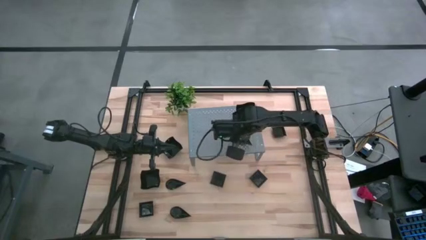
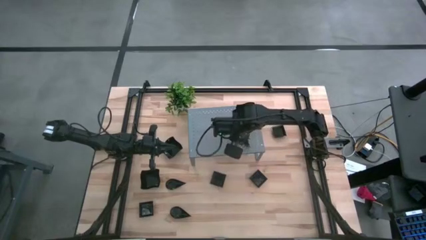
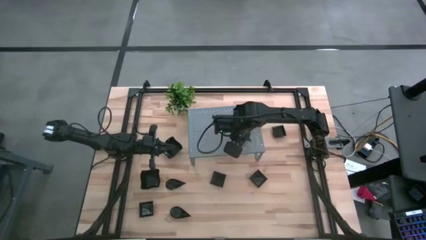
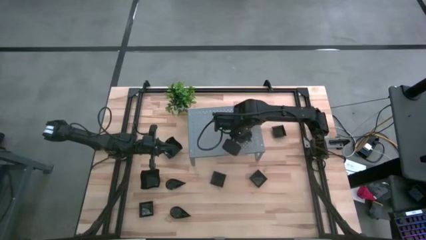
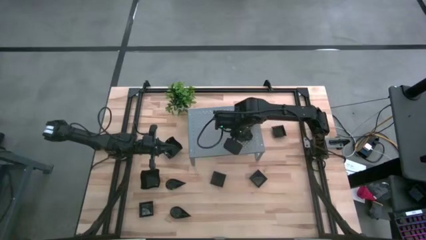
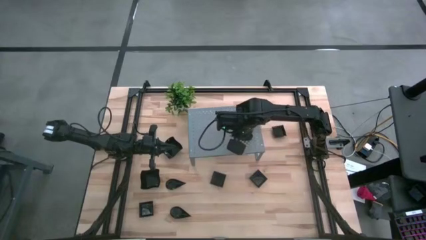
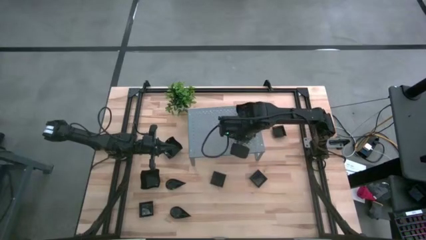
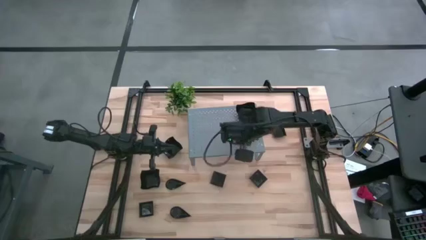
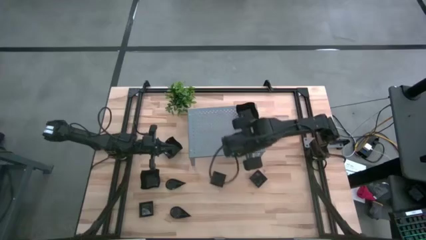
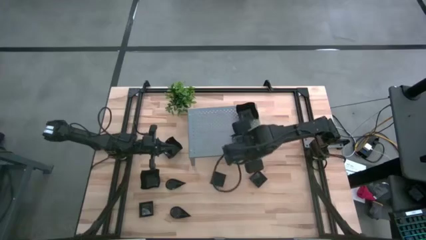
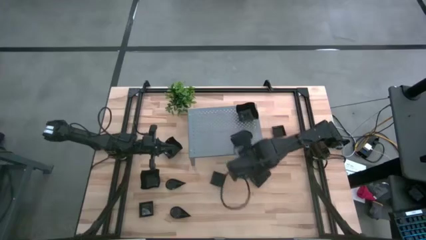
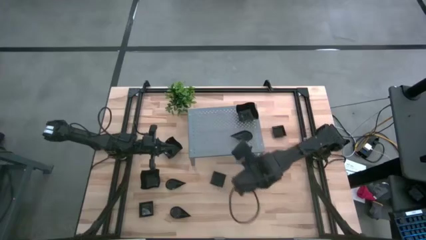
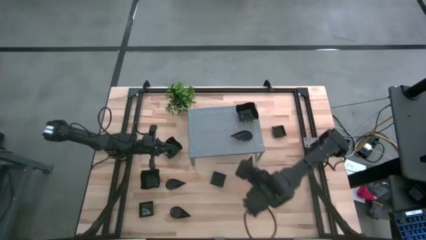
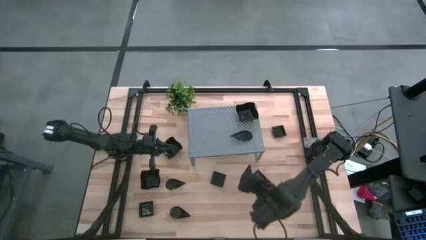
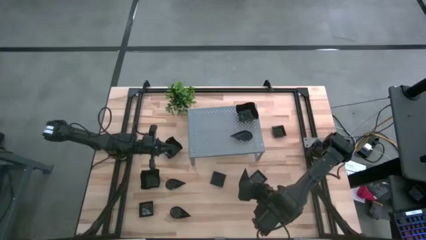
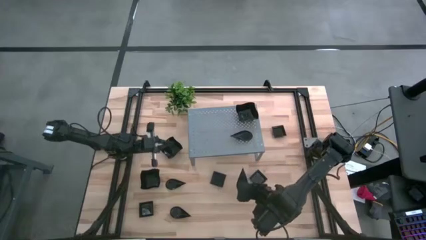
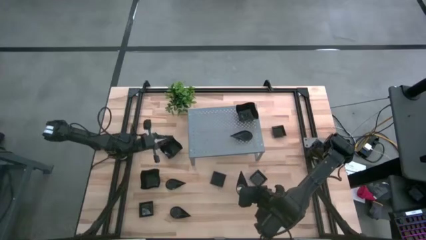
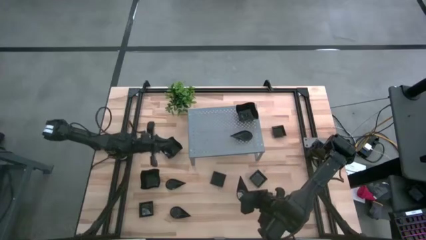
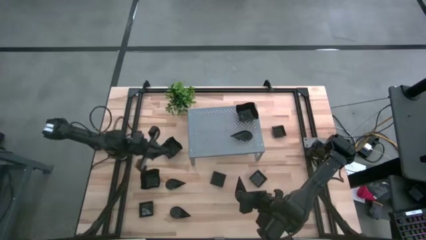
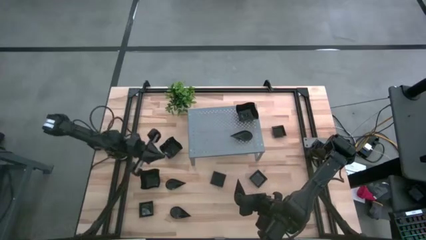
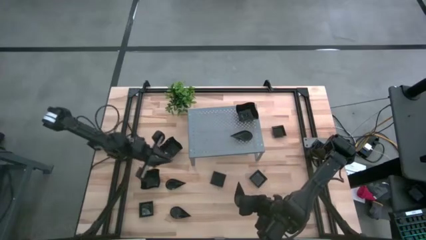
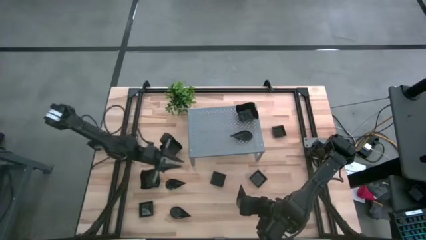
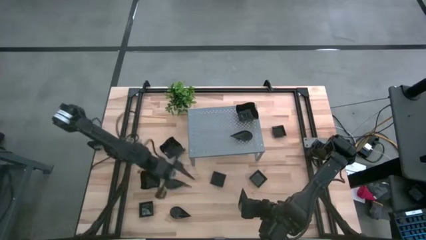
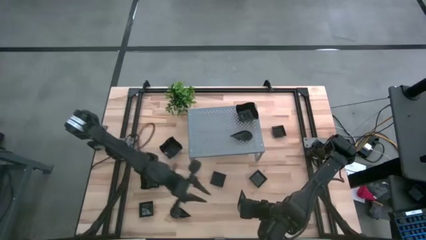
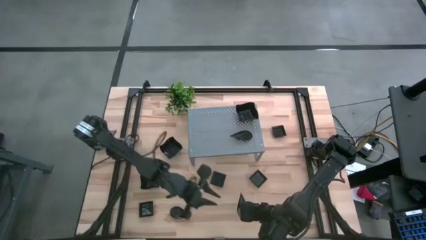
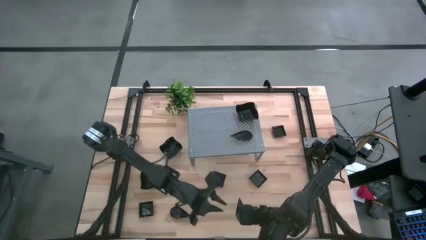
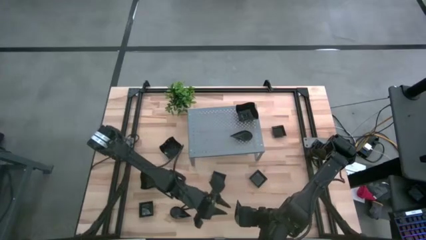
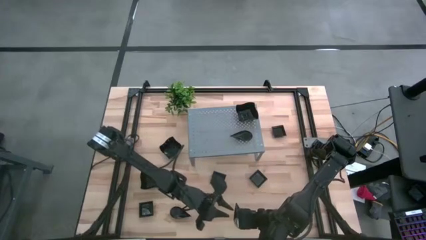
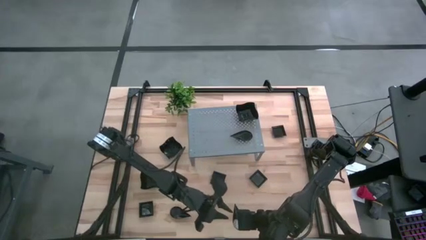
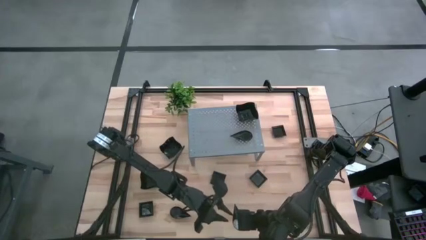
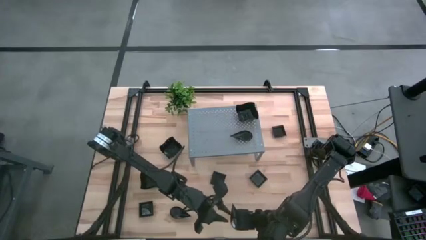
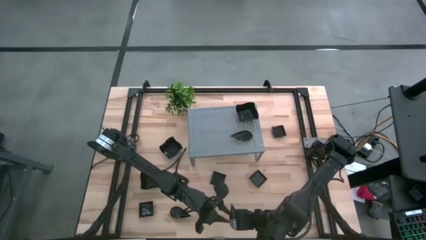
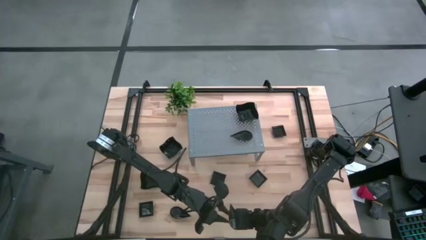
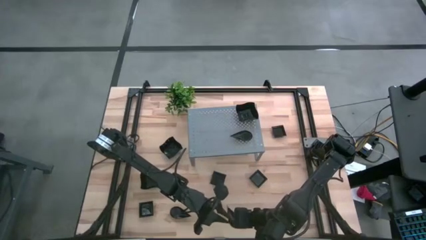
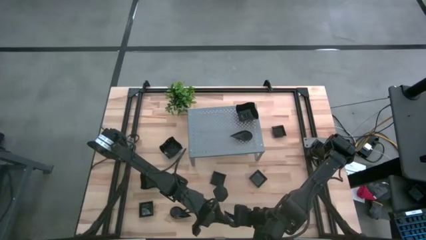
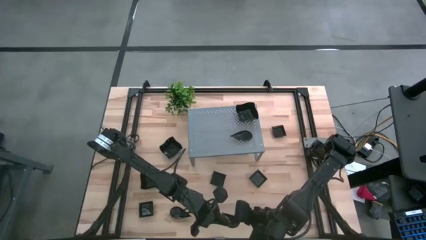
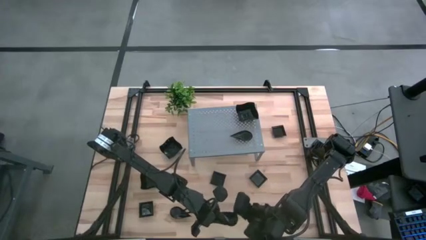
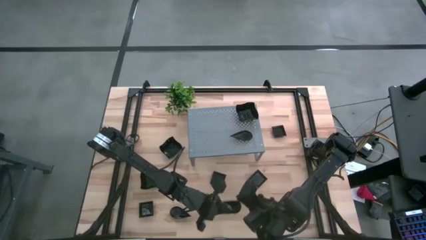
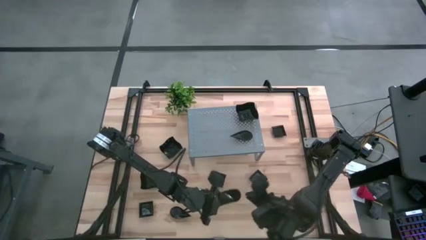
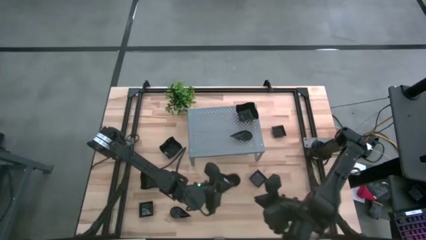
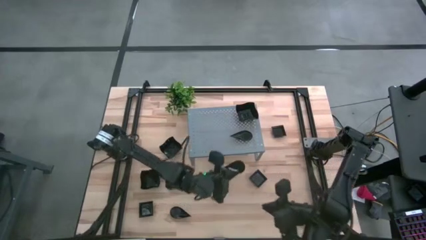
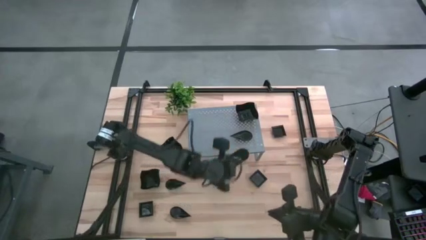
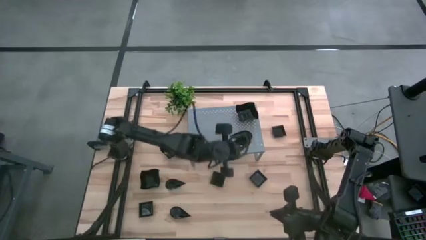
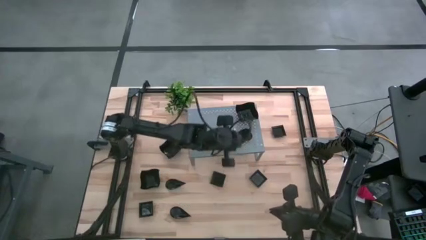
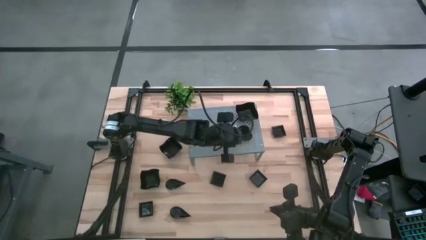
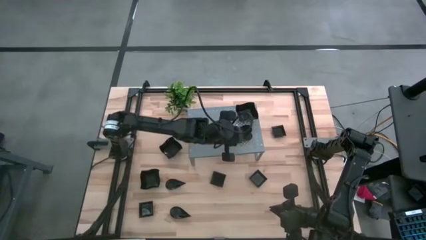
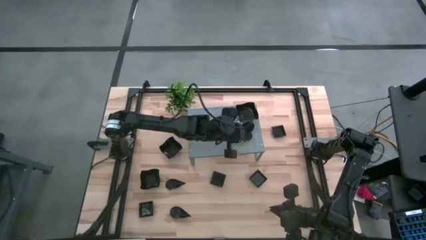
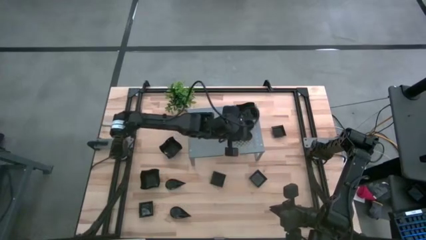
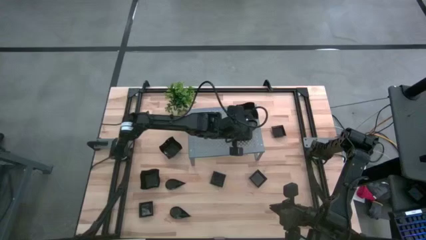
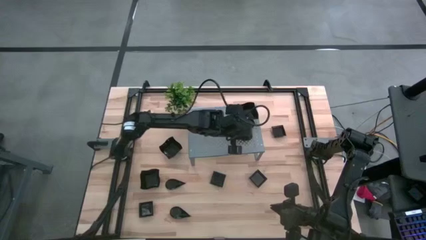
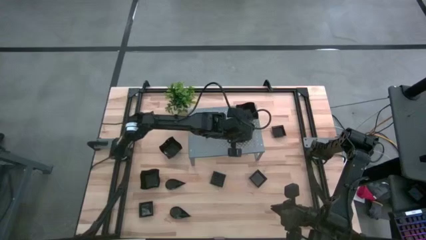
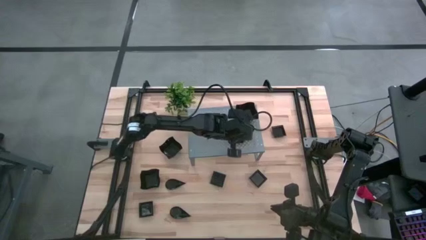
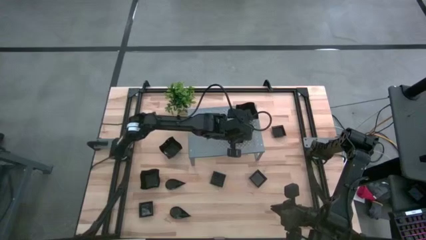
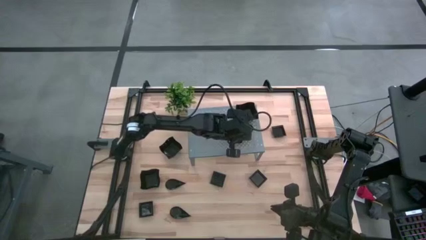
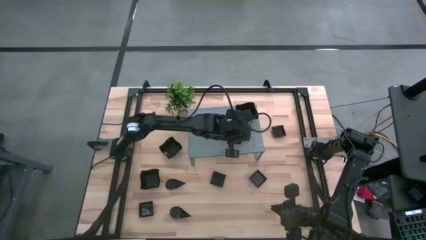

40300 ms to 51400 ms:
Task: Pick & Place Mini shaped plates
Stack the black drop-shaped plate on top of the black drop-shaped plate on the shelf

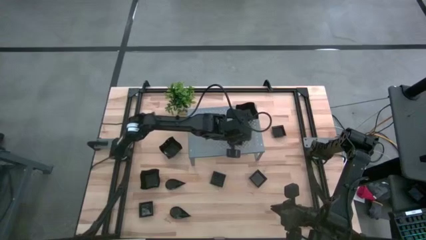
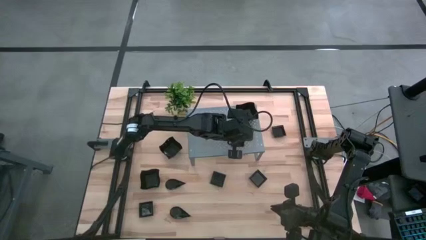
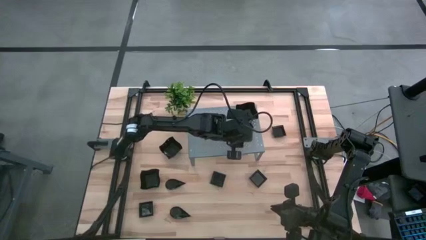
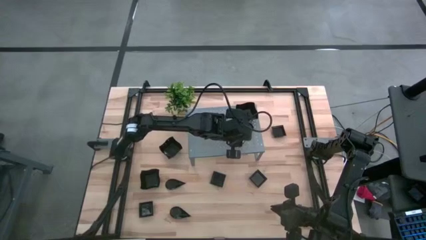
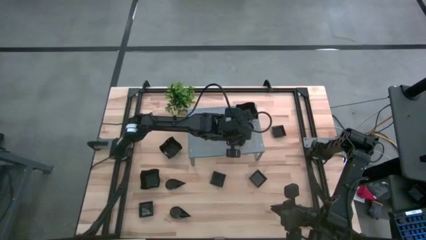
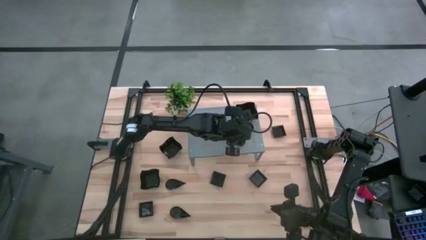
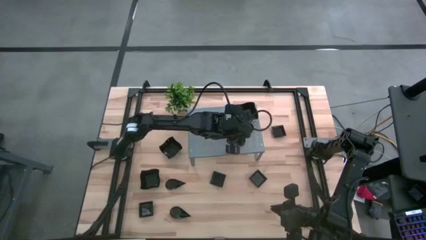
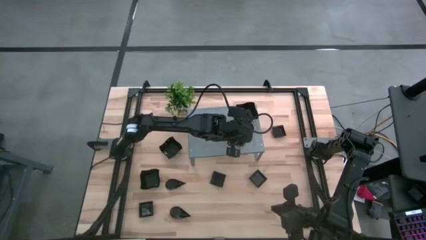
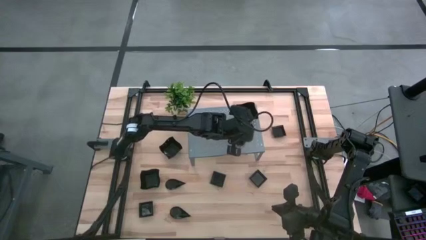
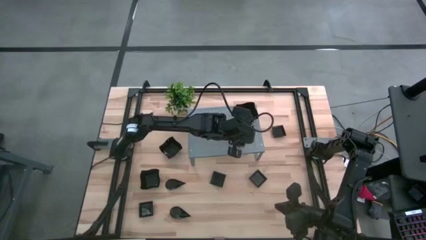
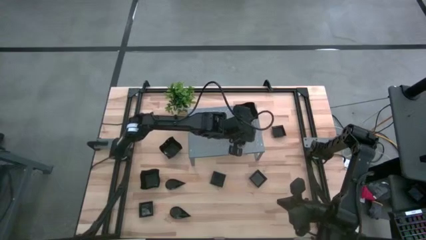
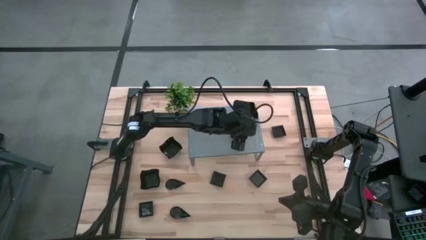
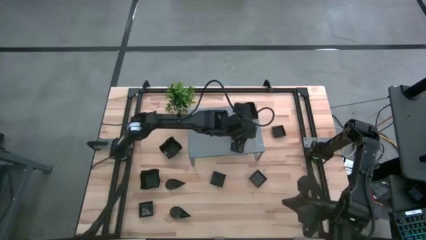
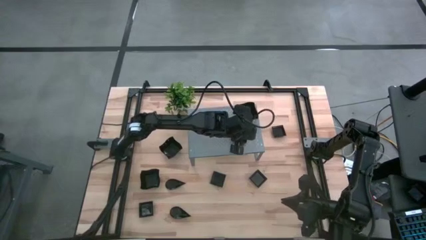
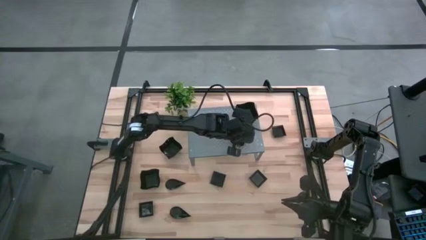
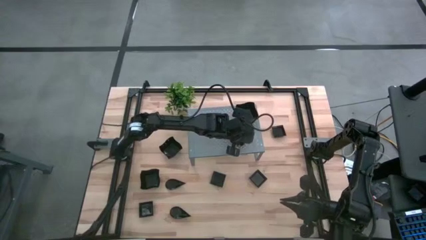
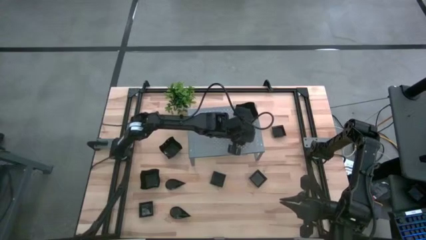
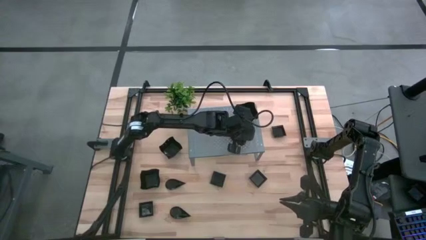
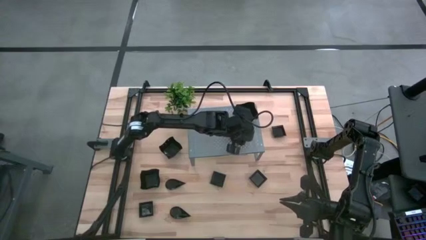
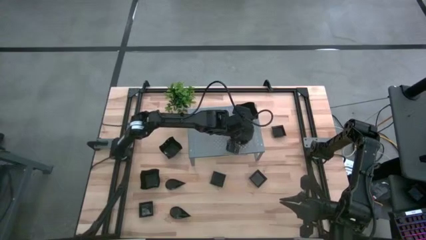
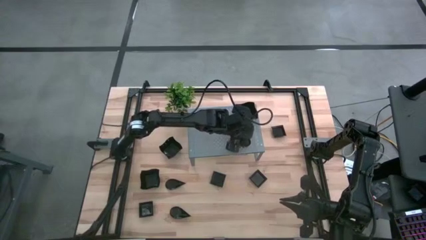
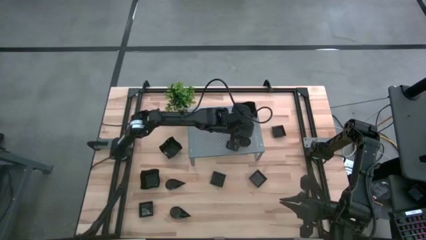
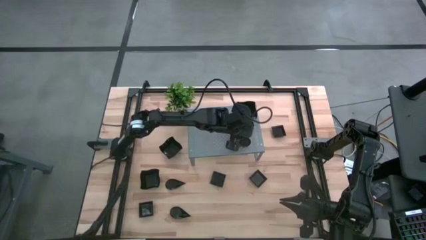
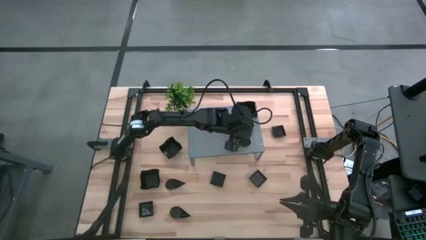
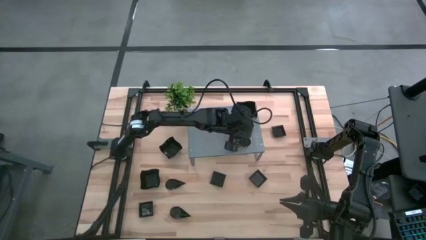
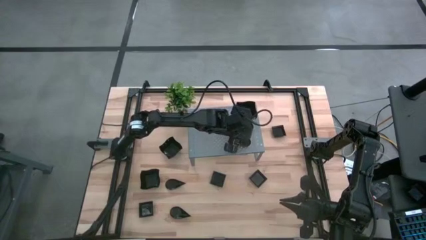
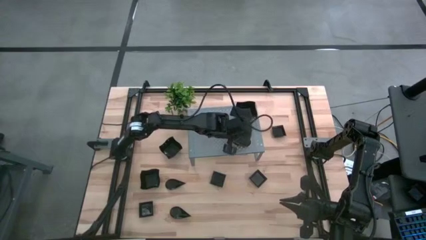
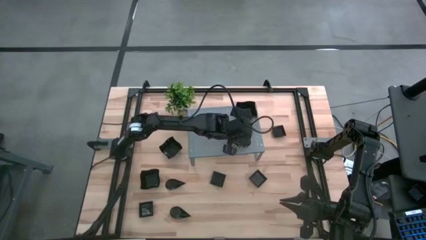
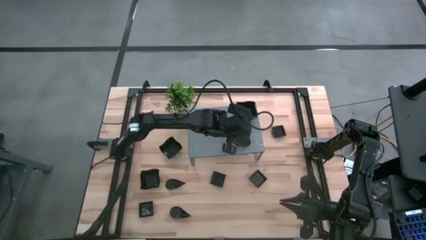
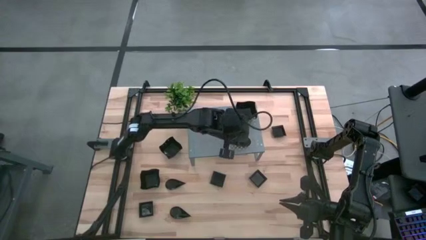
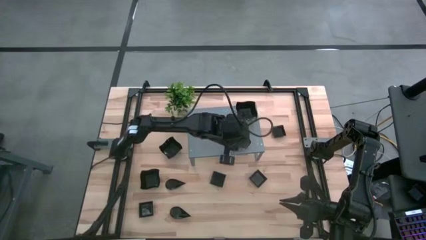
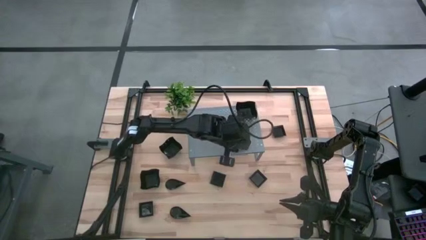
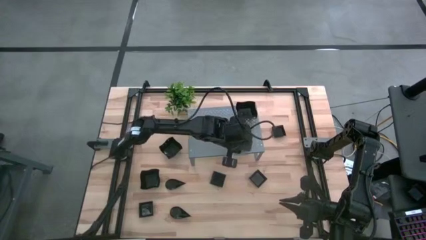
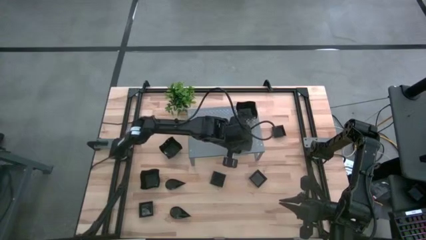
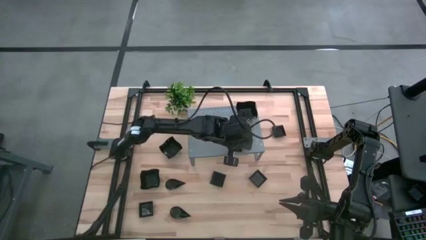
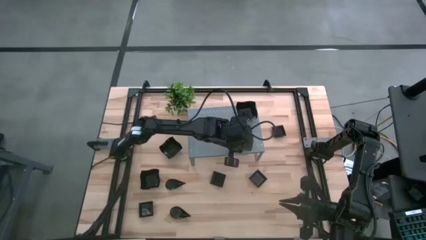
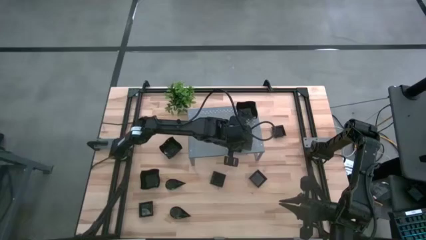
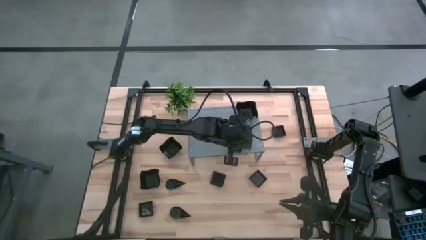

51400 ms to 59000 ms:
Stack the black drop-shaped plate on top of the black drop-shaped plate on the shelf
